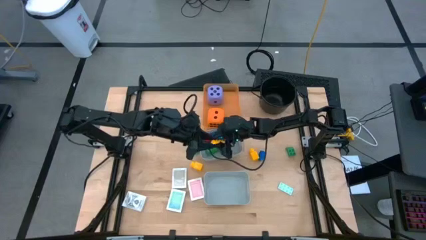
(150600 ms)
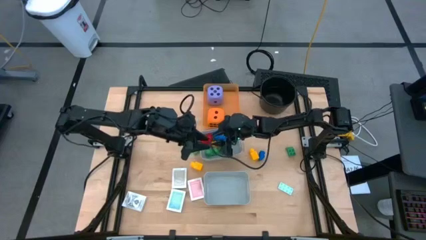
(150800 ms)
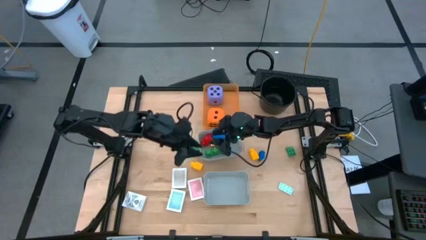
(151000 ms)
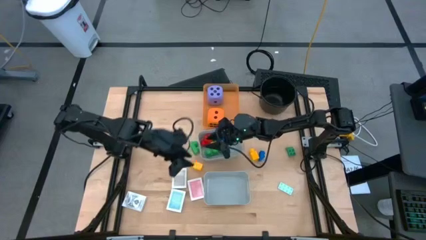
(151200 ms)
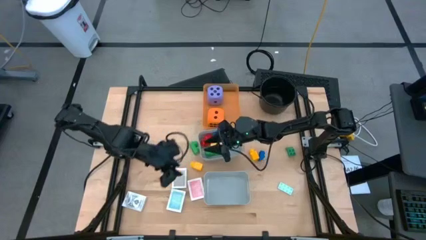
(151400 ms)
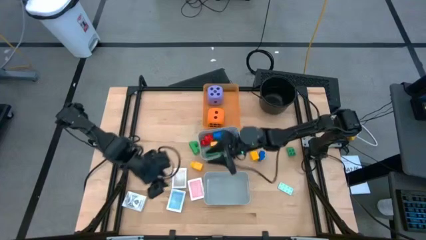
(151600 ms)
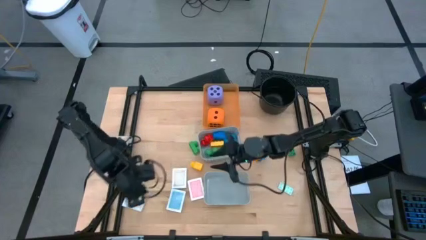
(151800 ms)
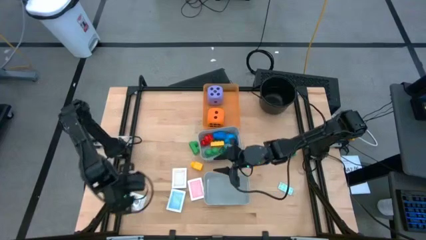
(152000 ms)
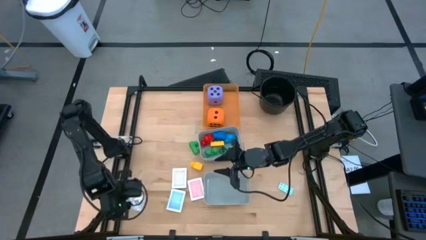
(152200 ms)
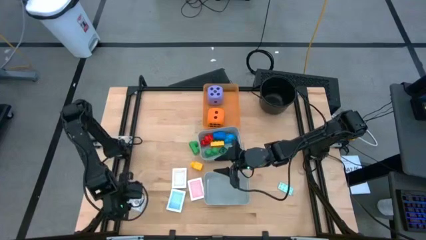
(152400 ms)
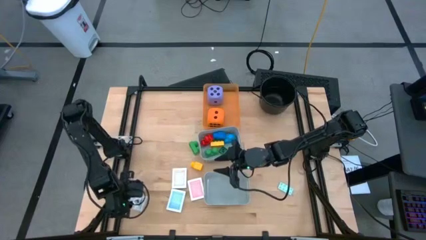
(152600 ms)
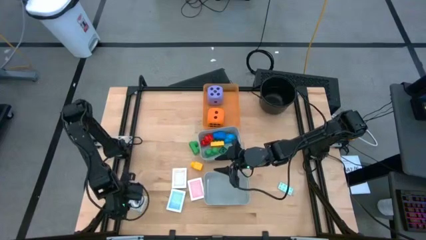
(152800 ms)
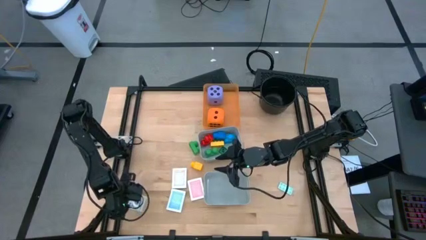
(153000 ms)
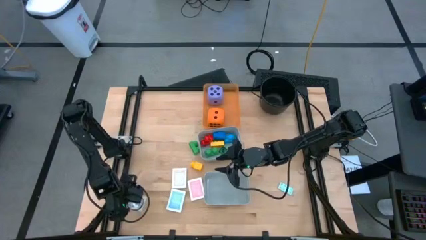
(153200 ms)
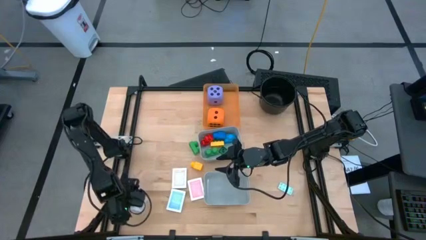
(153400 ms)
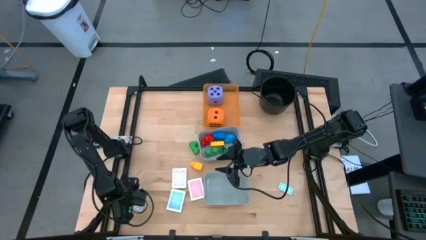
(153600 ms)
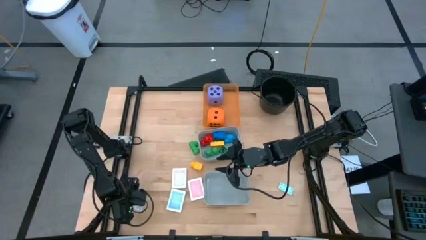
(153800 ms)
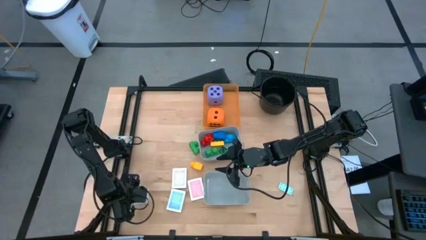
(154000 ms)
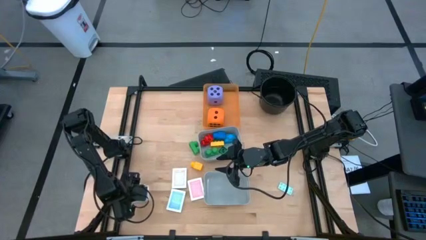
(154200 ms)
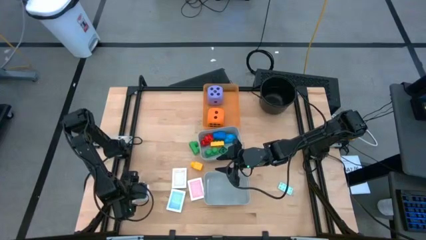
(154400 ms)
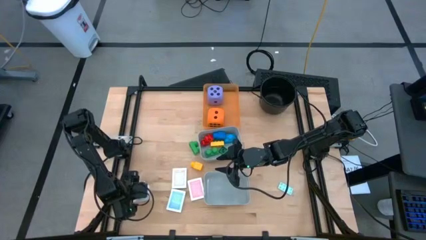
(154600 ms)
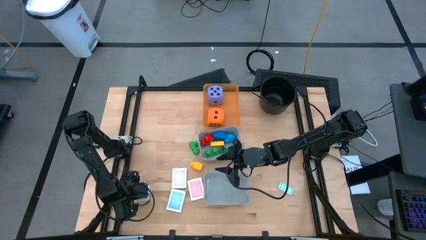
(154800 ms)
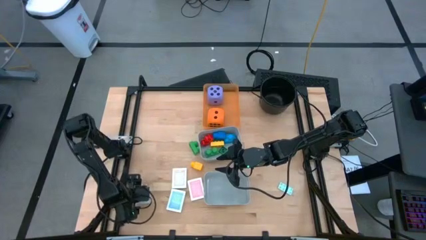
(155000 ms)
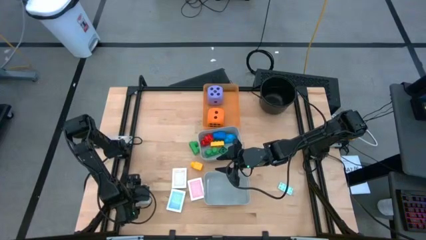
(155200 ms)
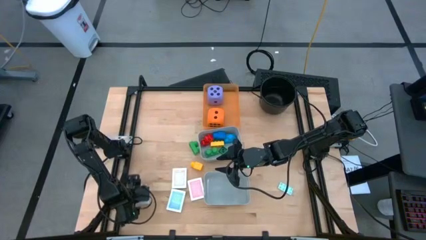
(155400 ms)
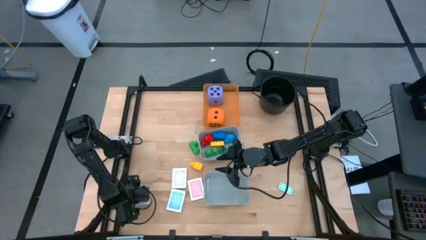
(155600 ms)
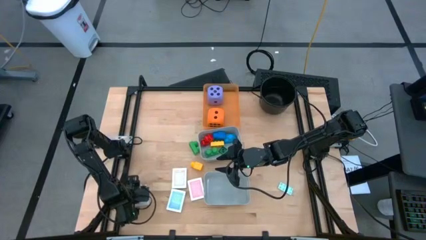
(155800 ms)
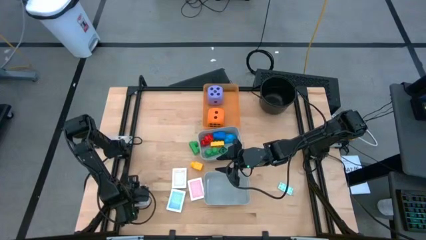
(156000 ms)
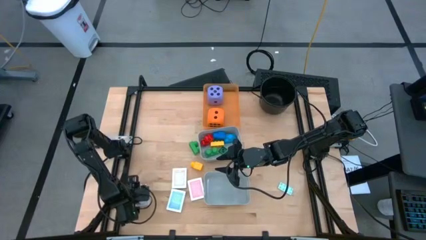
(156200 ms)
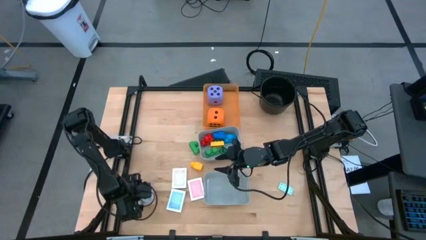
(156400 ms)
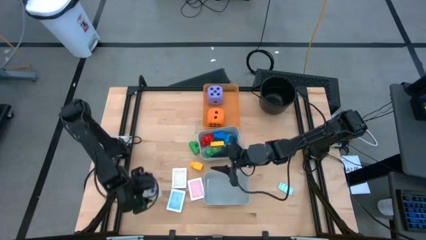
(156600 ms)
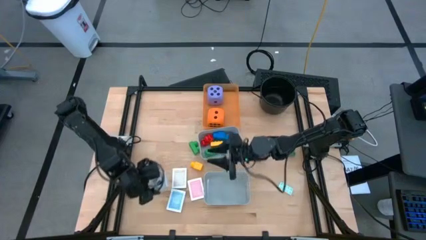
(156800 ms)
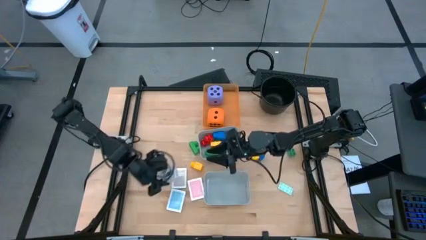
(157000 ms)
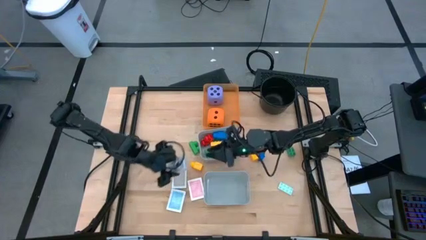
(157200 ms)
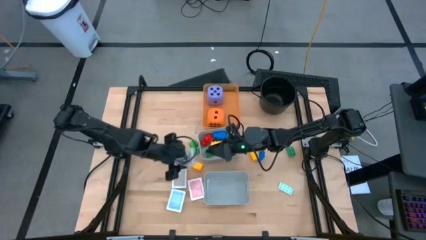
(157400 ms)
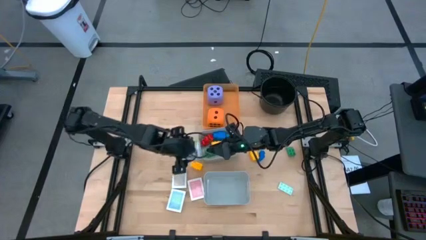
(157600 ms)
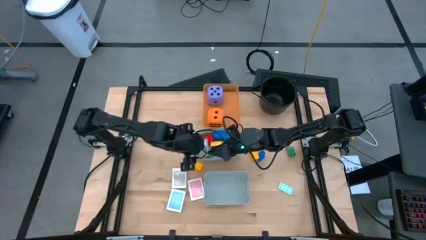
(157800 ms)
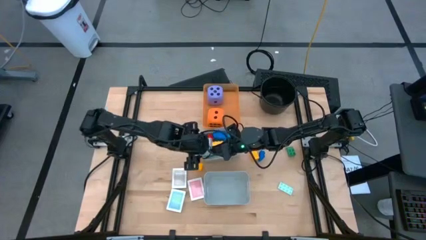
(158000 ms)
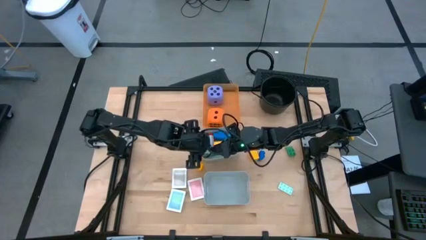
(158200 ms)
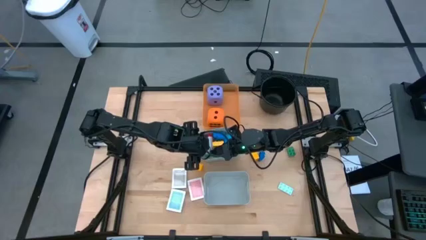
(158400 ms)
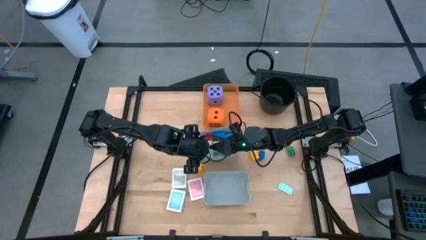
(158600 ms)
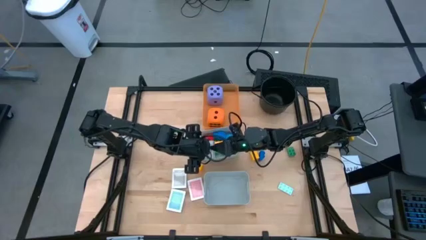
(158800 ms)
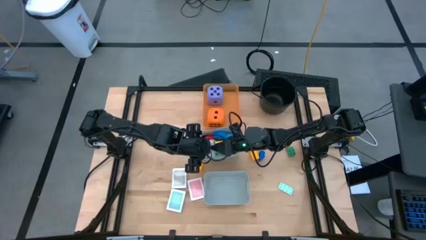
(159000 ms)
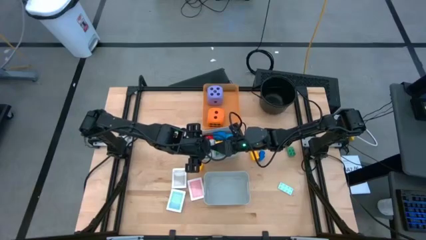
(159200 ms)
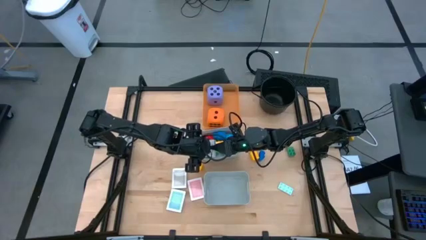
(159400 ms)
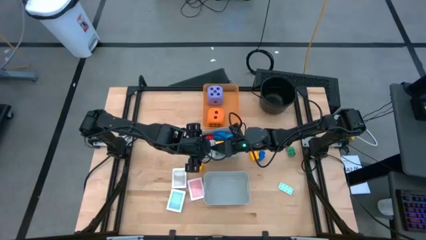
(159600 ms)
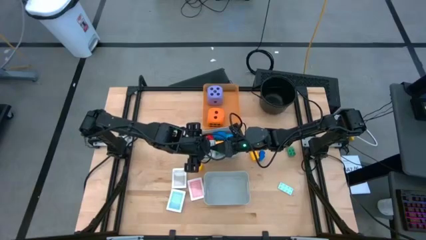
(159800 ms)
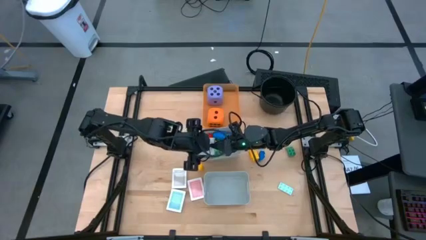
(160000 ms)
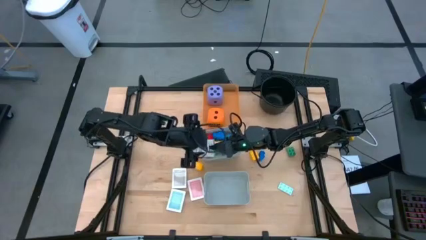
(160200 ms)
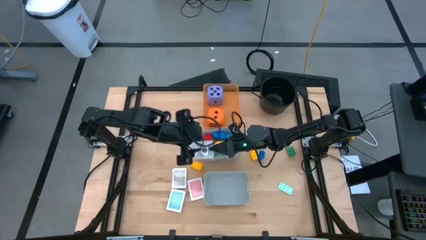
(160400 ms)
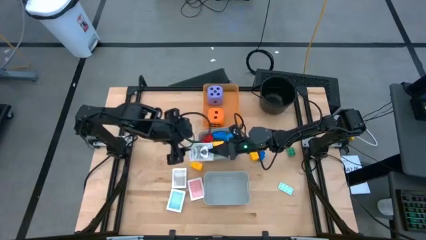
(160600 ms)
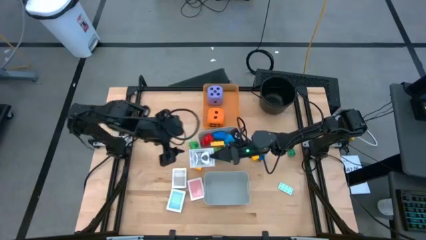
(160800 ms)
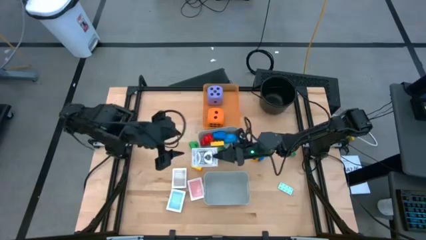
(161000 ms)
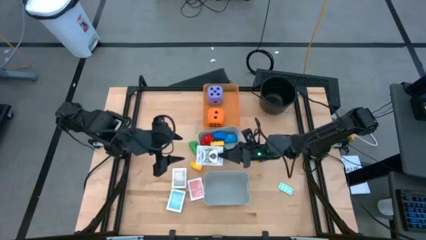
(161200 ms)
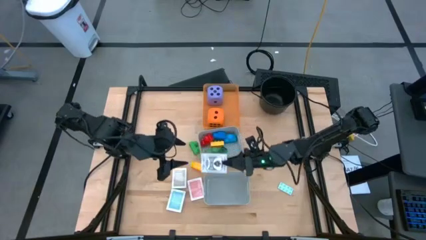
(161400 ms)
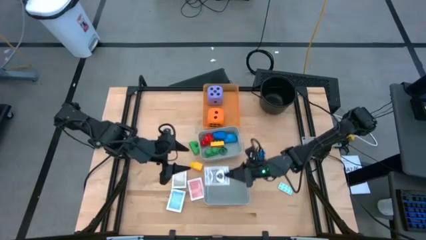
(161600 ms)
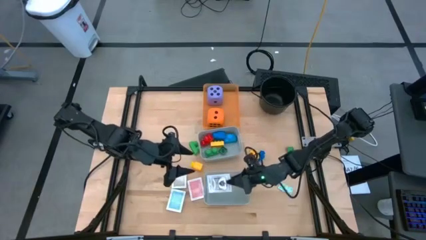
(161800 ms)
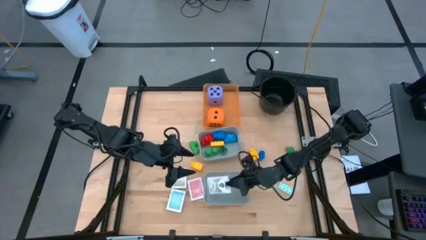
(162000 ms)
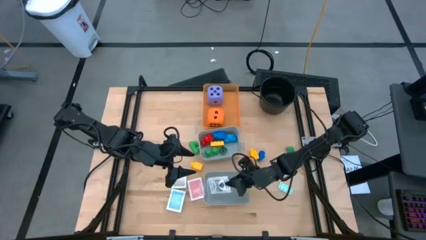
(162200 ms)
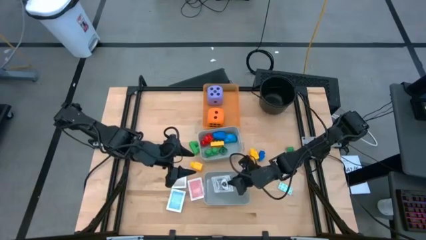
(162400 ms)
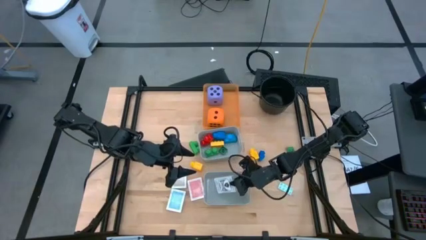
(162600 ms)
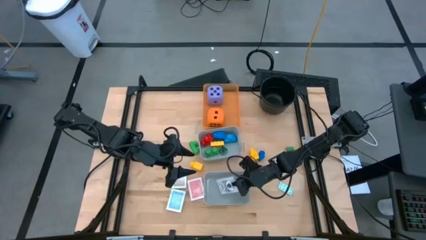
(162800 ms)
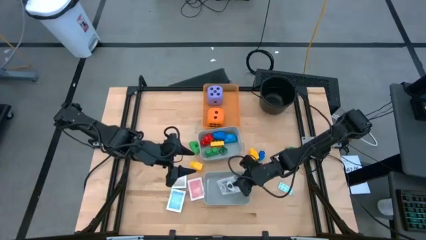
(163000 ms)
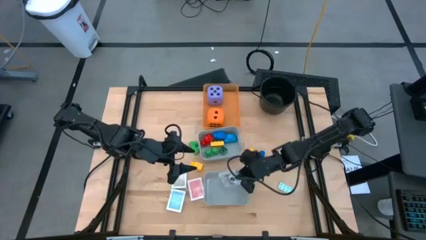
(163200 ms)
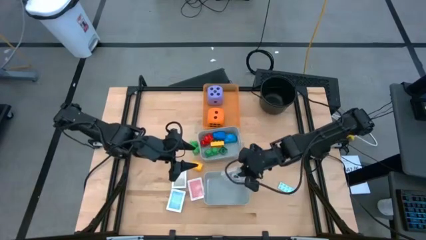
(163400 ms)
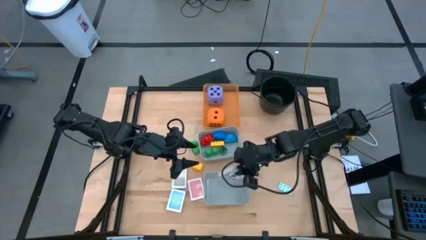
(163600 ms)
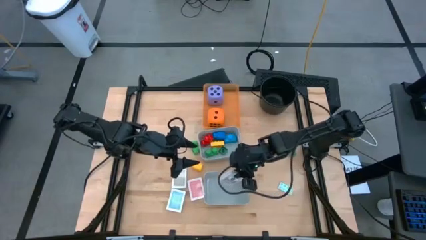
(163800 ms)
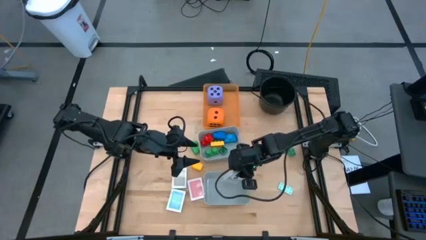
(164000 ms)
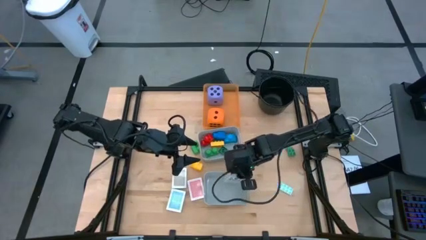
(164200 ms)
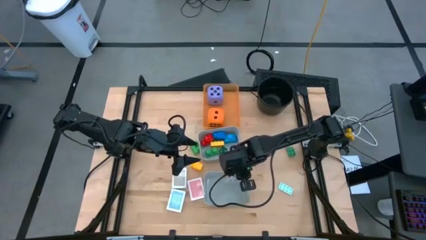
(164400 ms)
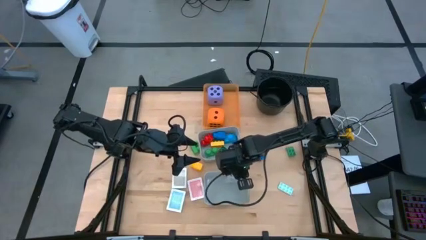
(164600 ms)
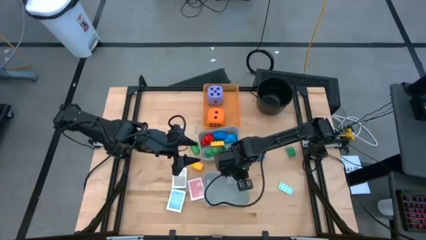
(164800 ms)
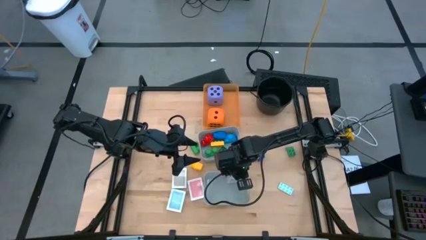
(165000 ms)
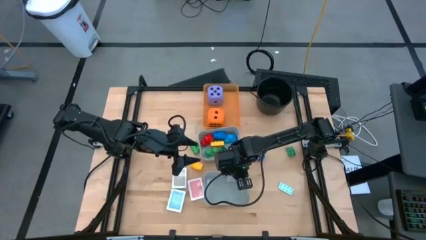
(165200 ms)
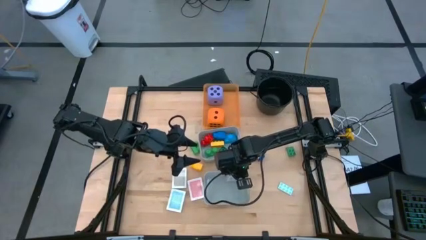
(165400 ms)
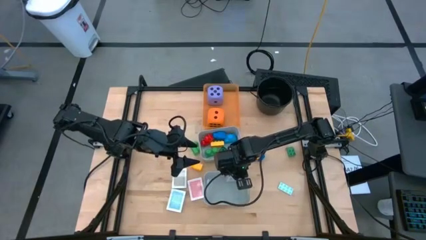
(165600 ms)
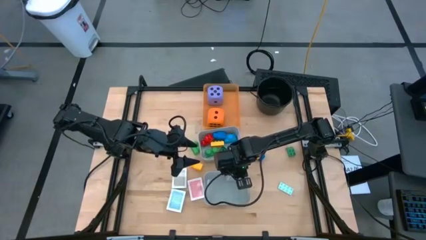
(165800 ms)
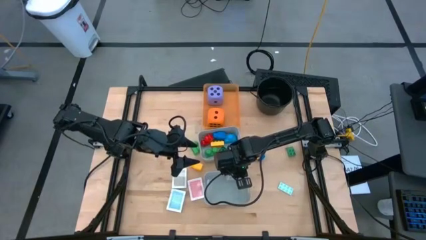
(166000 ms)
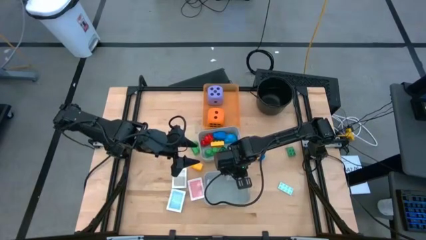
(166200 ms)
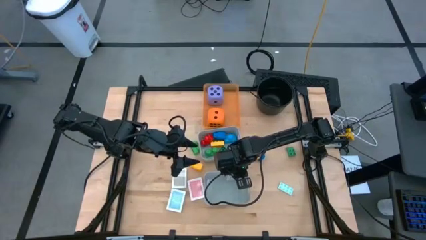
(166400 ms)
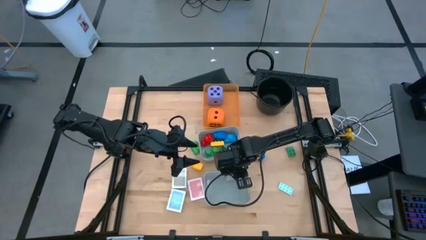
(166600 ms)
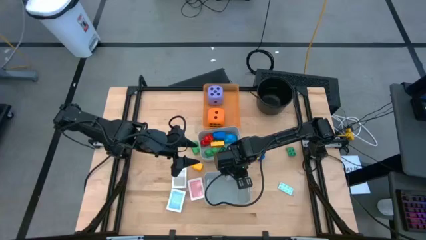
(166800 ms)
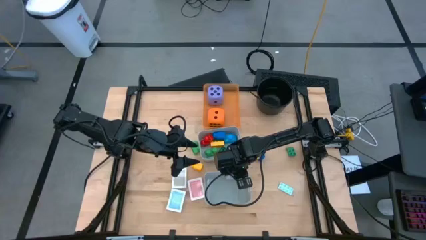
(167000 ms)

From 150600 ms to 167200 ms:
Task: Pick & Place Toys
Put the white and black playing card pack into the bottom gray bin
